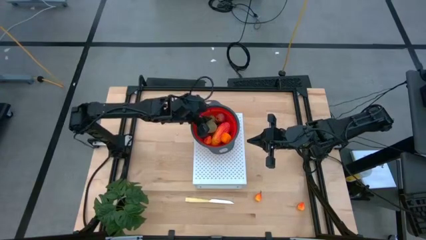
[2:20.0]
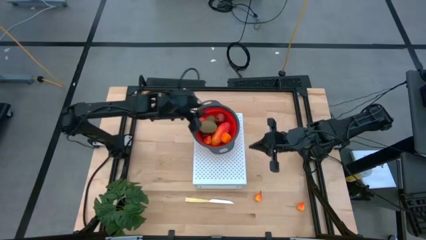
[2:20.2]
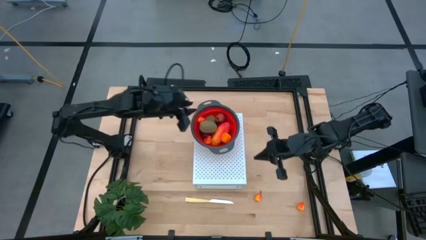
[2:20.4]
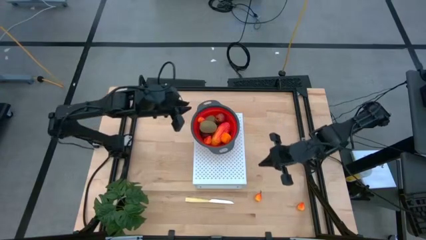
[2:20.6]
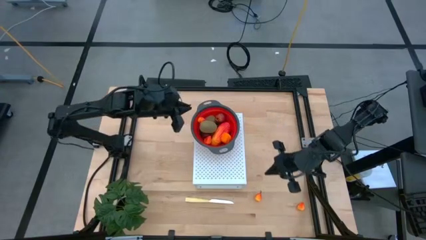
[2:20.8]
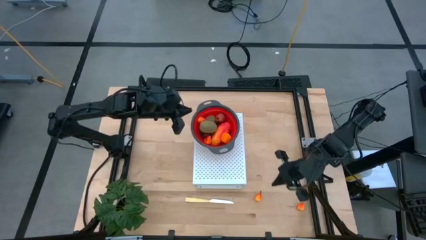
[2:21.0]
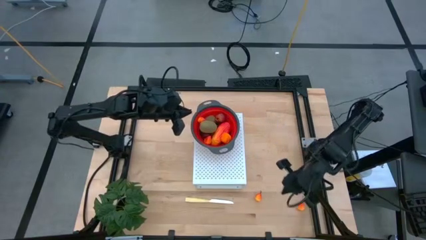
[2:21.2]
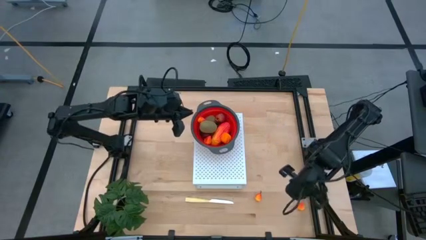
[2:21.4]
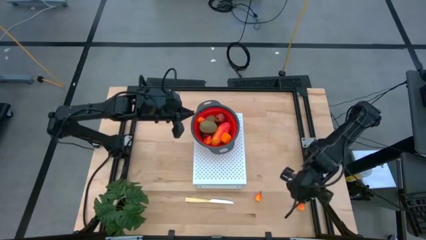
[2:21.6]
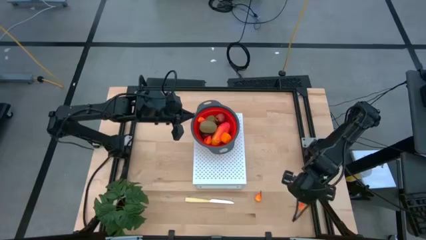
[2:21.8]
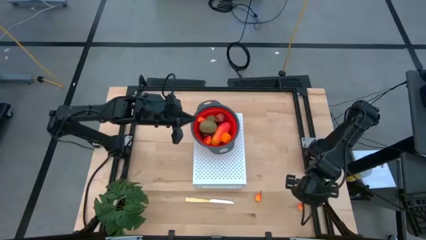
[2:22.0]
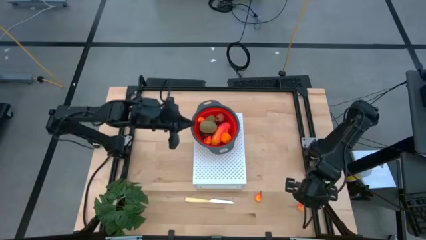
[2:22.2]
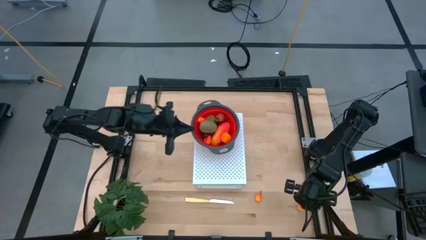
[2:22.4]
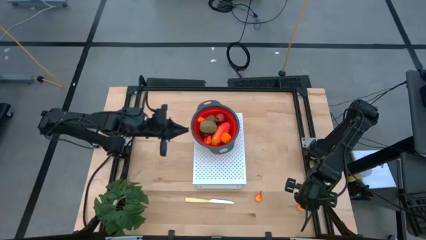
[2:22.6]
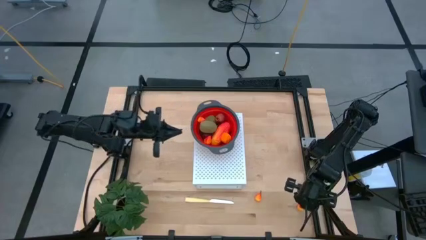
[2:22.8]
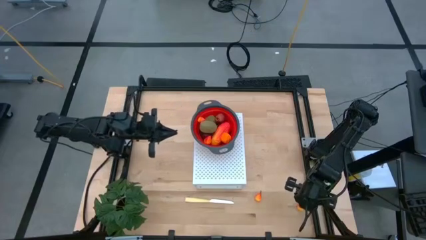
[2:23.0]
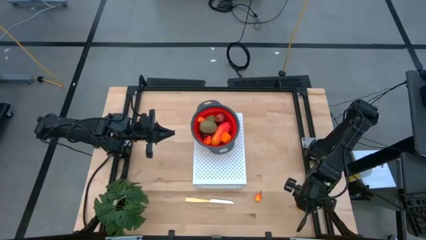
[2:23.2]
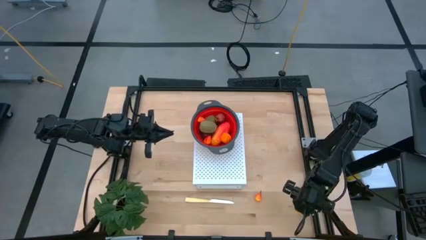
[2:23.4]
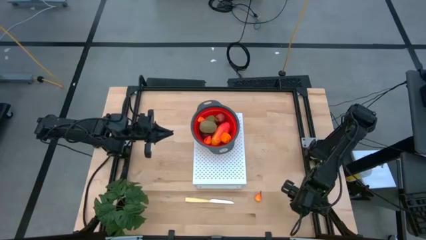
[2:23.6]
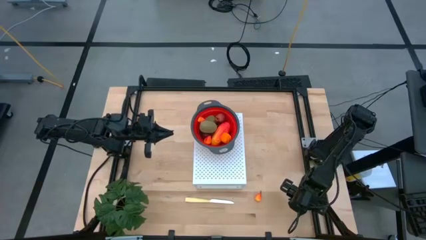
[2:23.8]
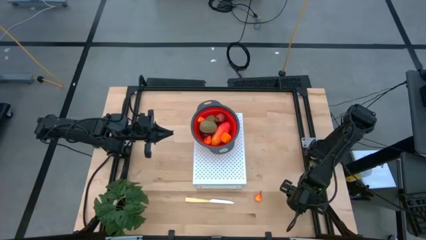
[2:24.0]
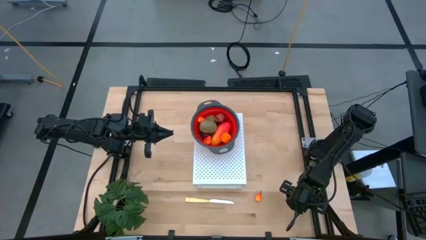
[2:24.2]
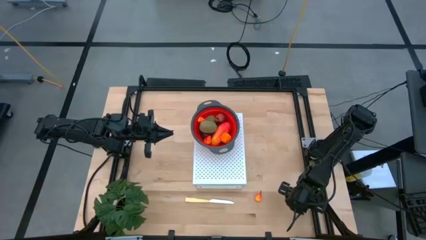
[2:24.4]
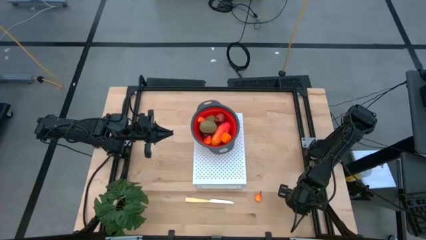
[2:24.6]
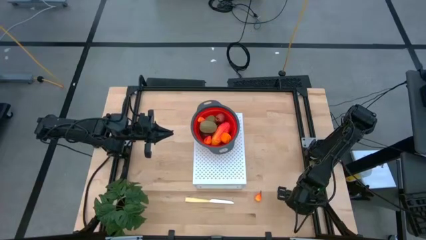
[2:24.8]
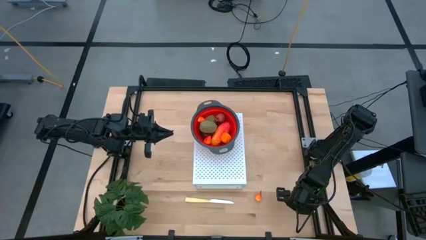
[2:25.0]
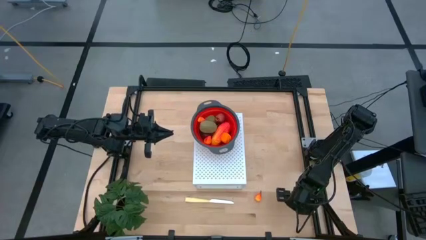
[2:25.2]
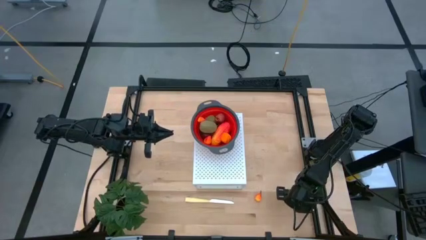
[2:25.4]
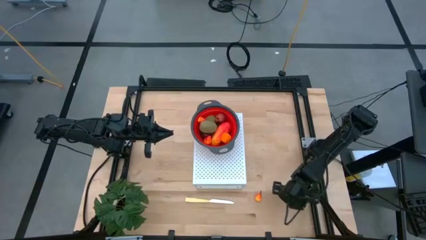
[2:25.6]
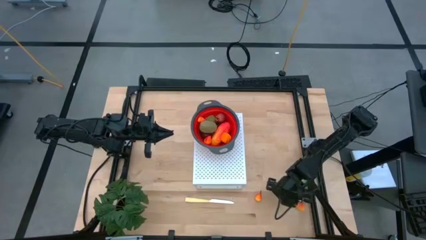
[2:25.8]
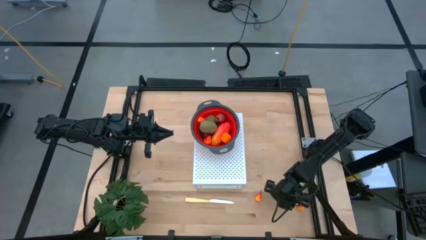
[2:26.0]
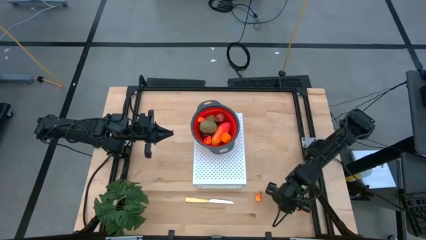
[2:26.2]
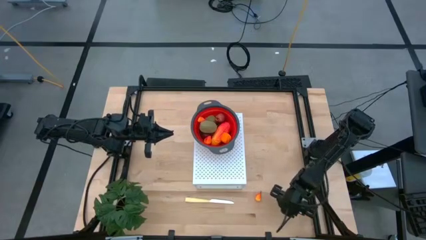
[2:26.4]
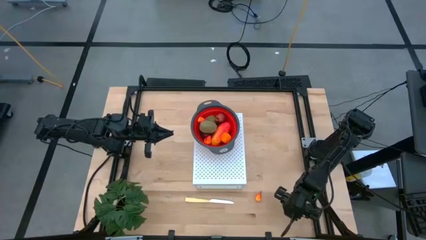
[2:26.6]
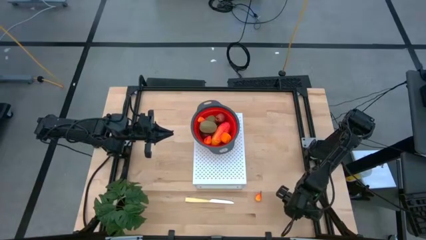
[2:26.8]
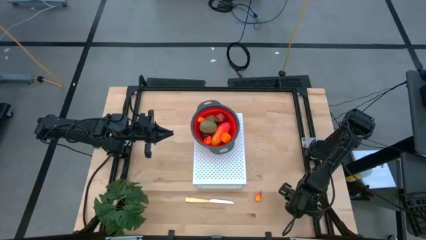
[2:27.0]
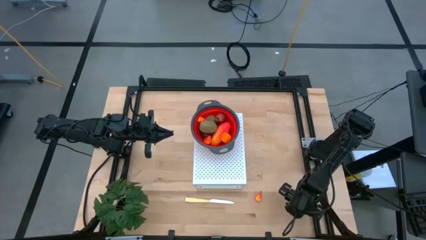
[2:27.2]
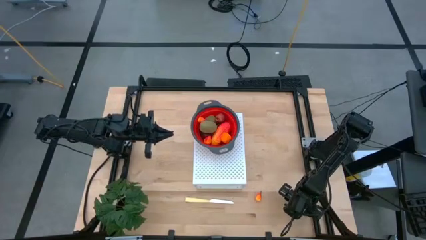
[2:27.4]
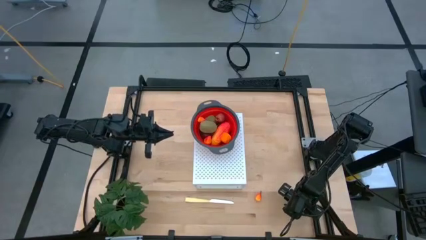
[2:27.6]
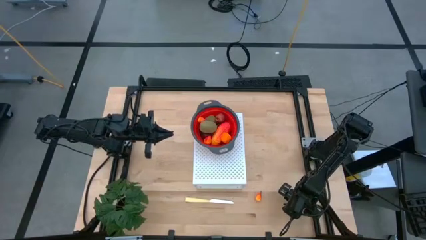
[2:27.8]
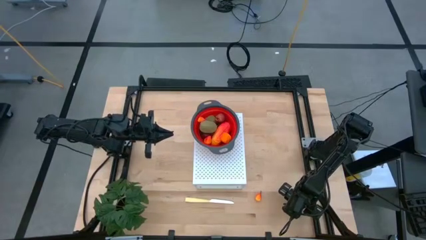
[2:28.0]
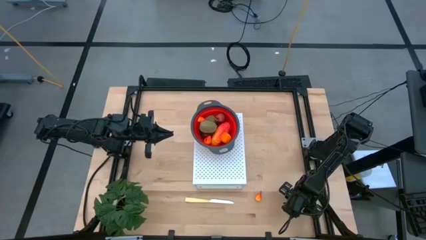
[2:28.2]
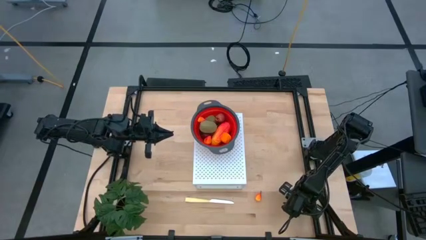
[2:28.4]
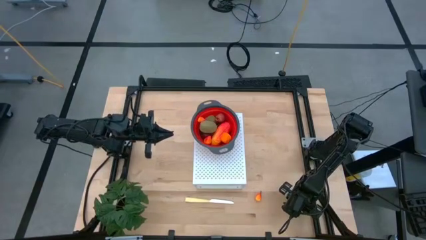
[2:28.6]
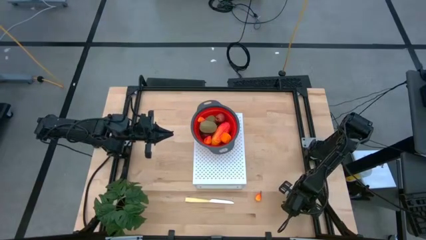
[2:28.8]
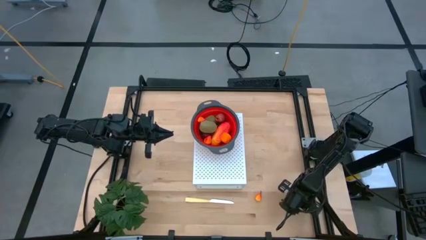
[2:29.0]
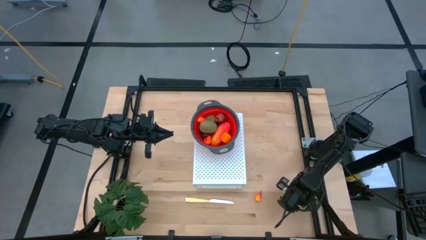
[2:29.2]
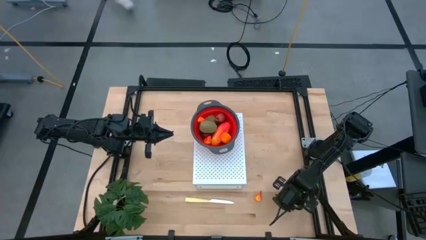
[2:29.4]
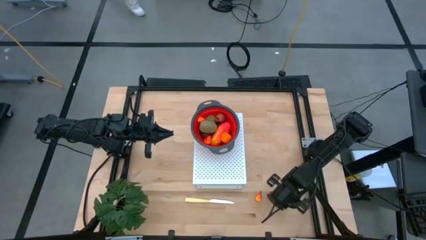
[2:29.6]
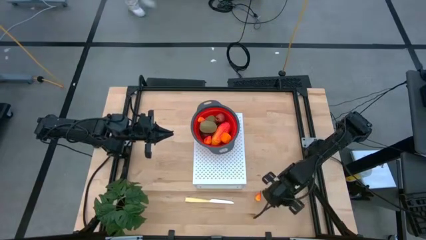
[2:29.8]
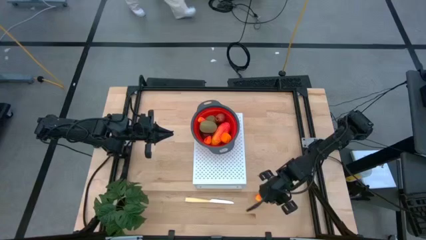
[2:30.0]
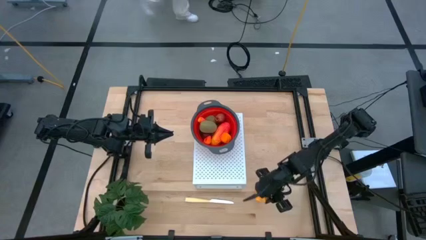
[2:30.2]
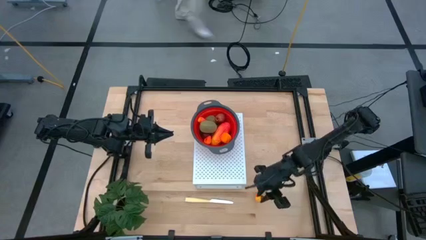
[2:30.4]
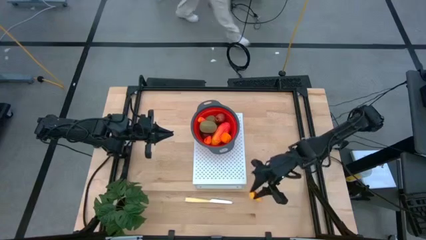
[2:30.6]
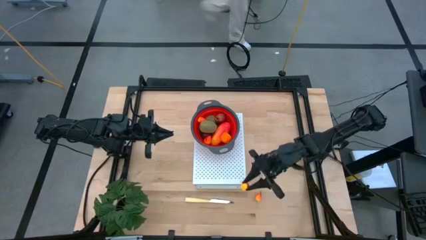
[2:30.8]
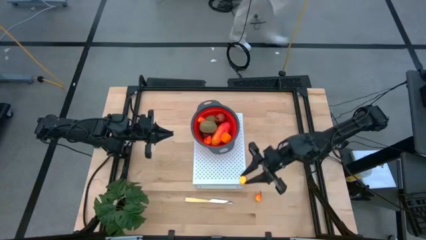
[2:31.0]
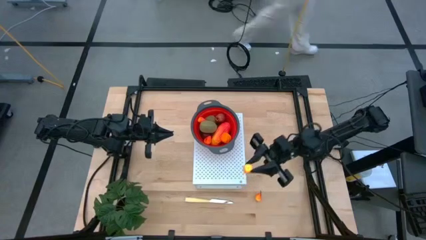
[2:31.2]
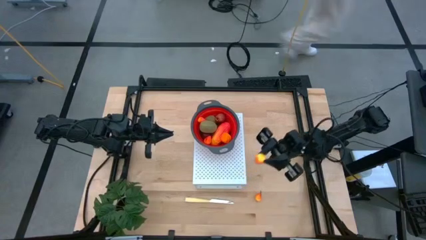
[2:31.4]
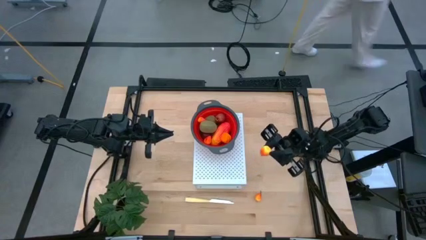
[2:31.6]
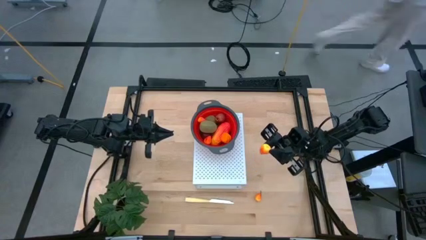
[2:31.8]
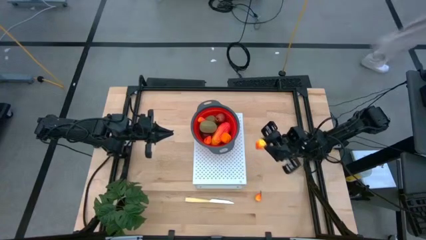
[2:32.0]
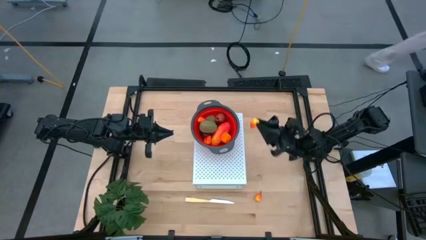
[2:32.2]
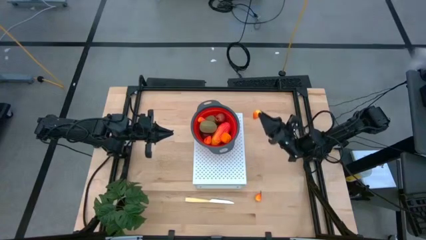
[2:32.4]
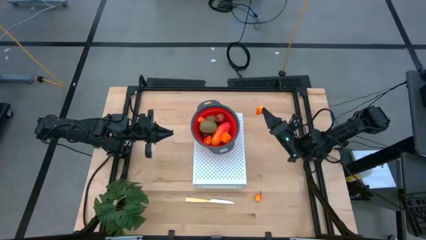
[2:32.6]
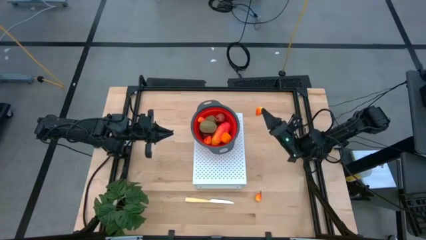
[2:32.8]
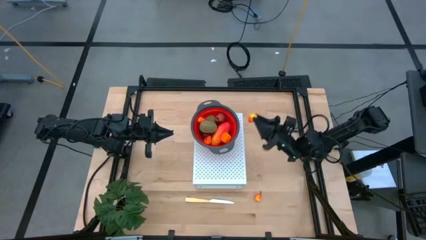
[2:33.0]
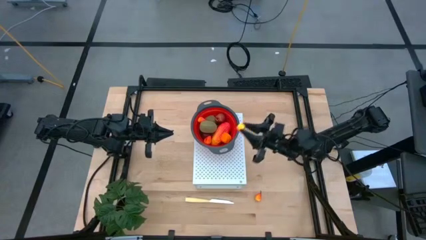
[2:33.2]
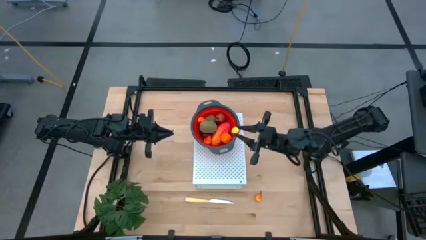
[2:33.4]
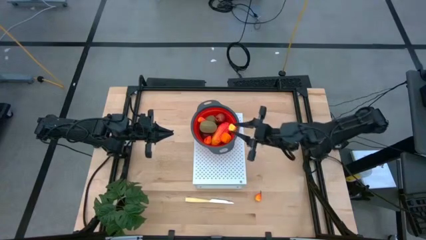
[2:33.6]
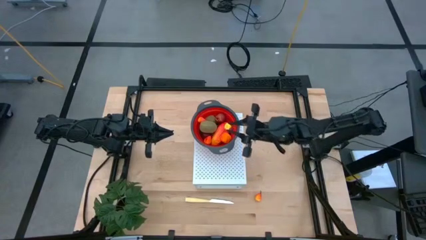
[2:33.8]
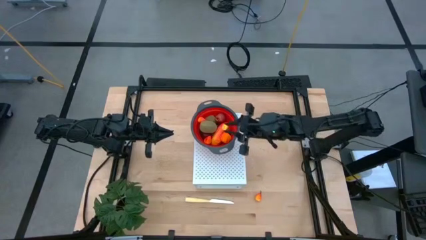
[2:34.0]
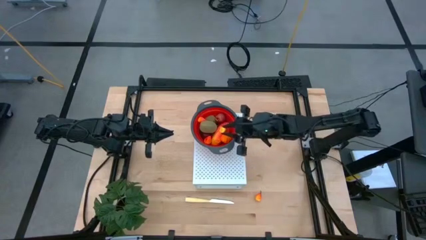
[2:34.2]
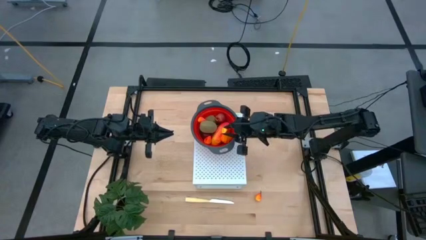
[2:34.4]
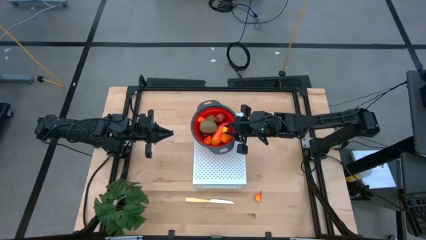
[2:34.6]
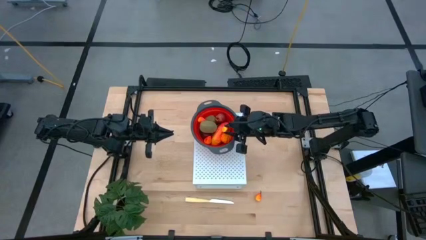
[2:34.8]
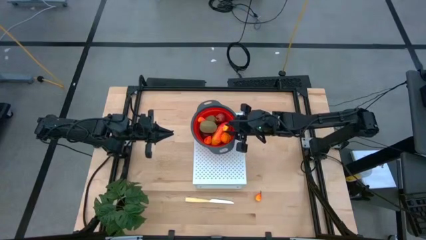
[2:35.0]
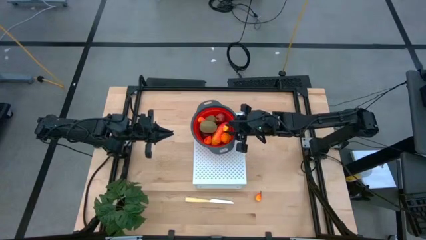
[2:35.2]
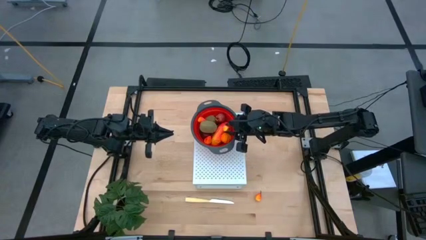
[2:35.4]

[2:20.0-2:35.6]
Task: Pick & Place Fruit
Put the peach into the red strainer bowl on the shelf

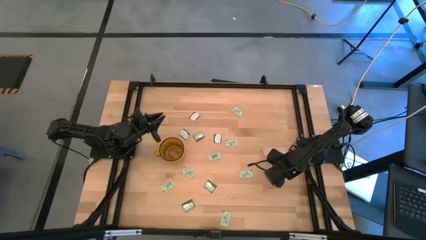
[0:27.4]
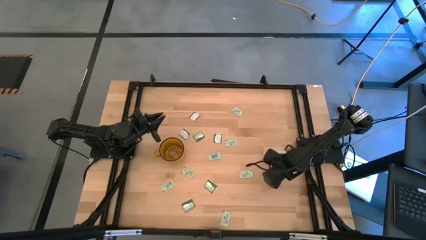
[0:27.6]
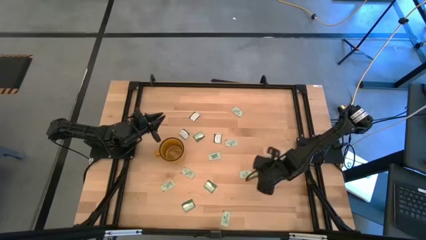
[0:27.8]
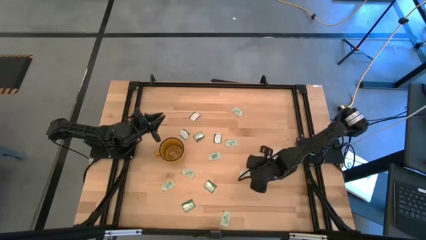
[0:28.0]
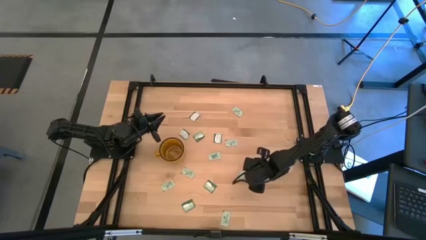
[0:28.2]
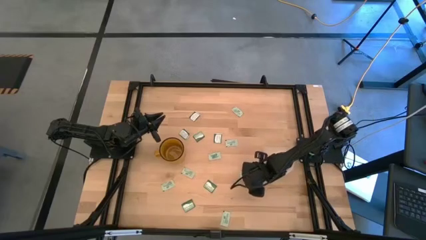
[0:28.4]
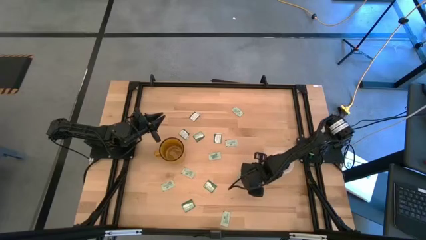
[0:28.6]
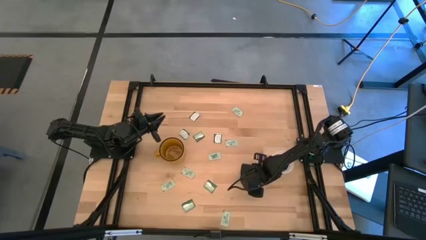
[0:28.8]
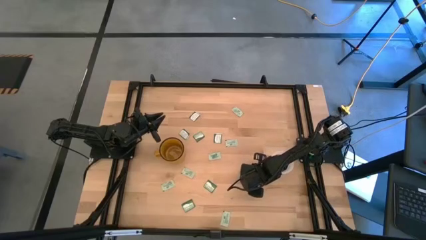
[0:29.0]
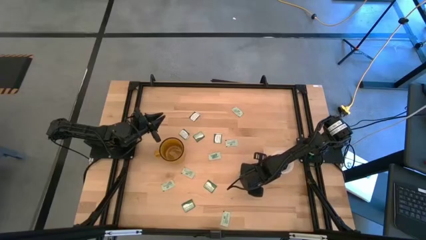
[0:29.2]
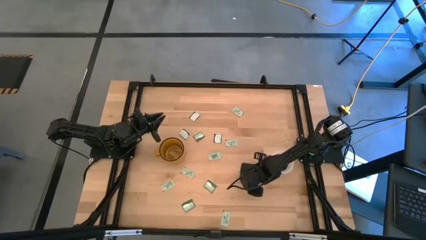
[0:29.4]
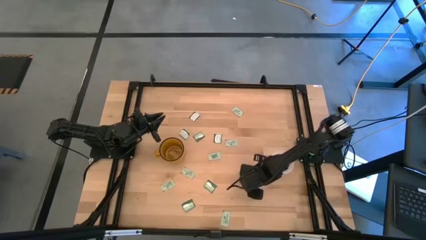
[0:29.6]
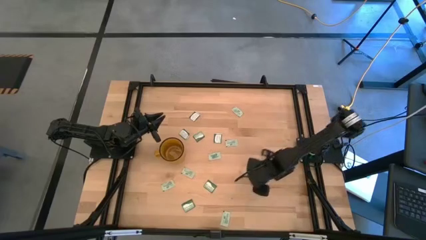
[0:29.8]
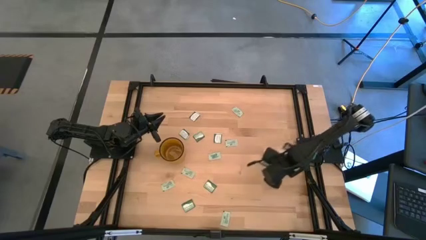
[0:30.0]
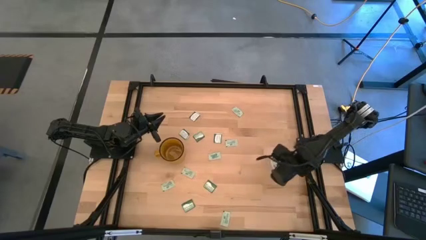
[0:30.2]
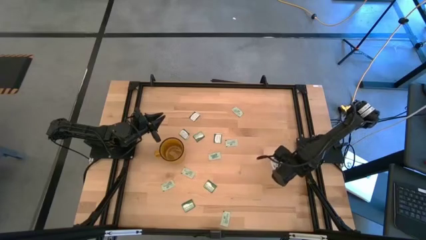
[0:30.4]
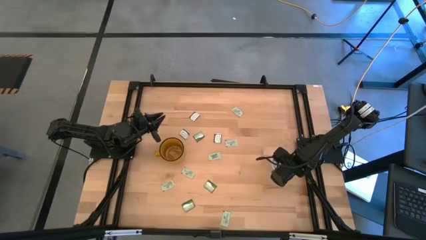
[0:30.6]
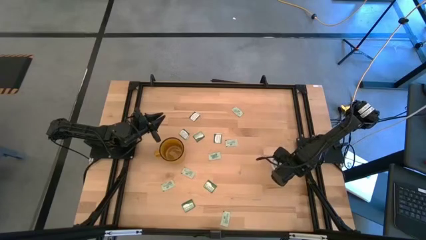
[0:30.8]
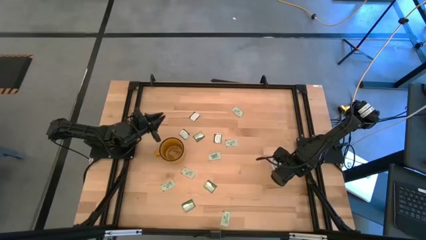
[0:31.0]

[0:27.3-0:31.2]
Task: Pick and place Stevia / Truvia into bins
Put the green stevia packet into the transparent container
